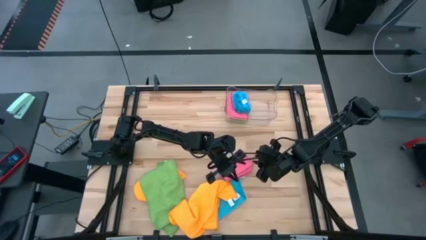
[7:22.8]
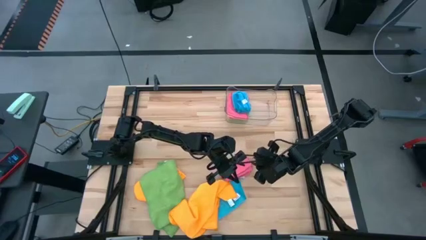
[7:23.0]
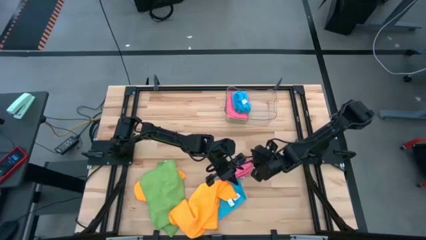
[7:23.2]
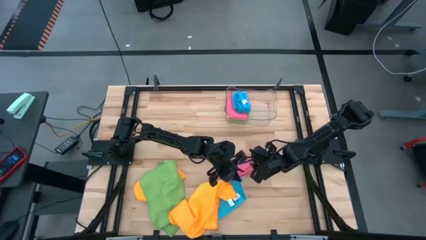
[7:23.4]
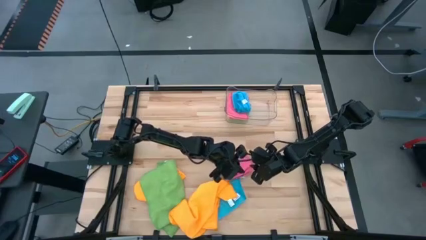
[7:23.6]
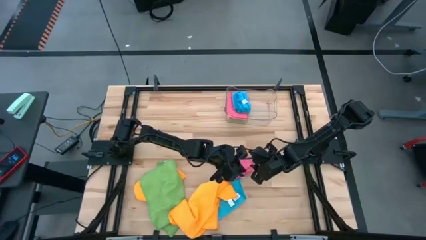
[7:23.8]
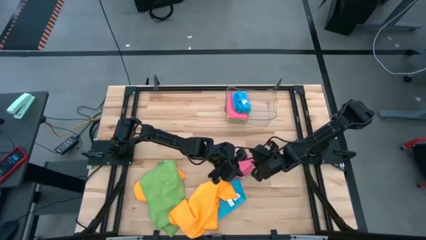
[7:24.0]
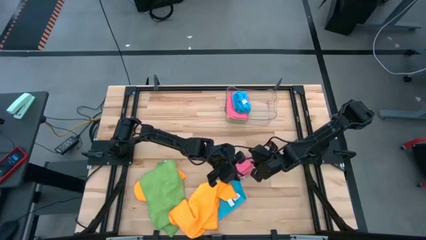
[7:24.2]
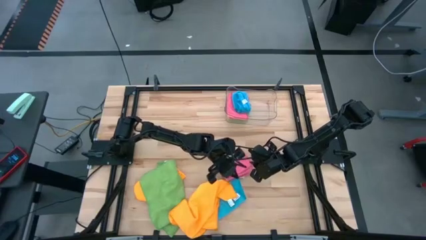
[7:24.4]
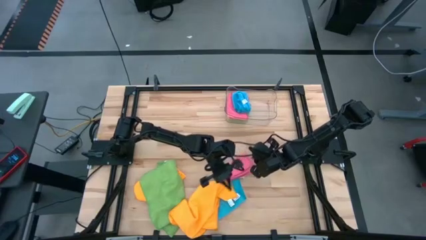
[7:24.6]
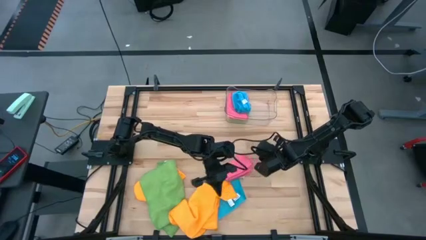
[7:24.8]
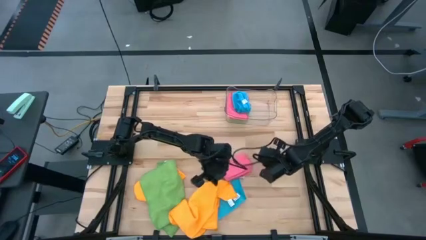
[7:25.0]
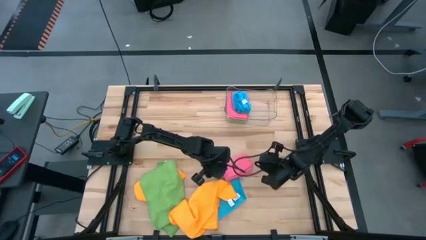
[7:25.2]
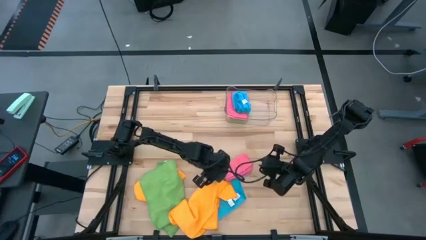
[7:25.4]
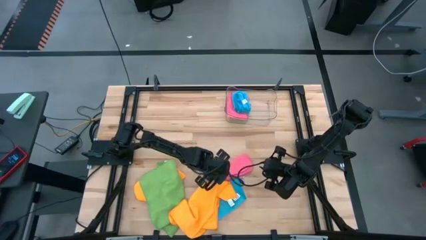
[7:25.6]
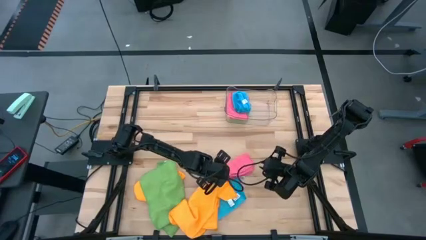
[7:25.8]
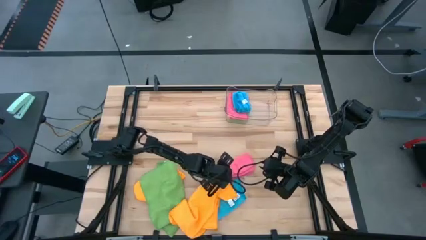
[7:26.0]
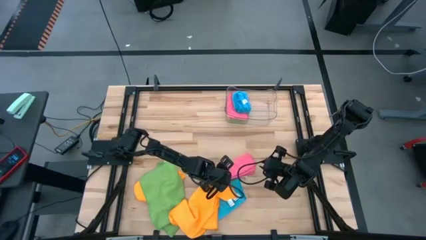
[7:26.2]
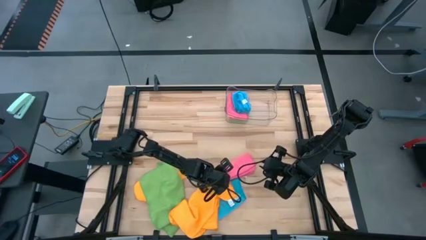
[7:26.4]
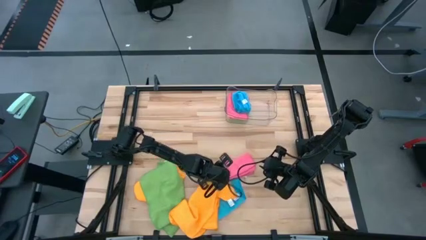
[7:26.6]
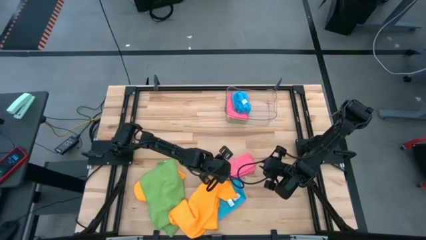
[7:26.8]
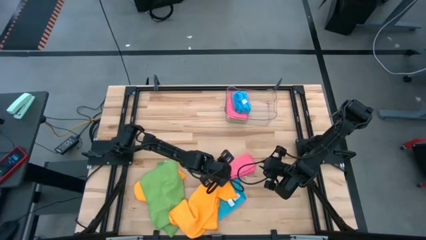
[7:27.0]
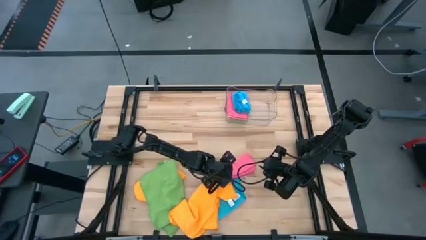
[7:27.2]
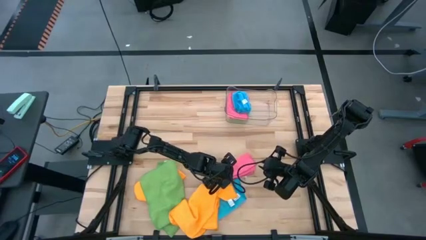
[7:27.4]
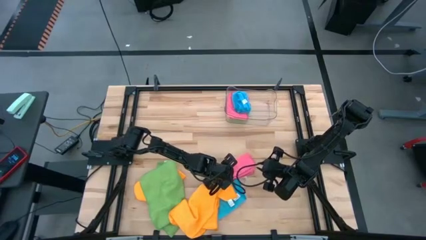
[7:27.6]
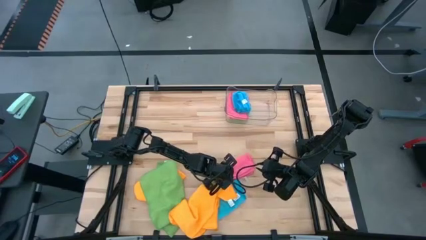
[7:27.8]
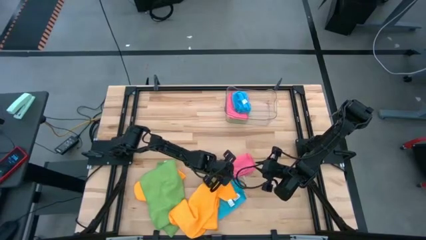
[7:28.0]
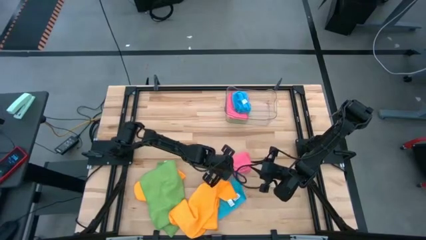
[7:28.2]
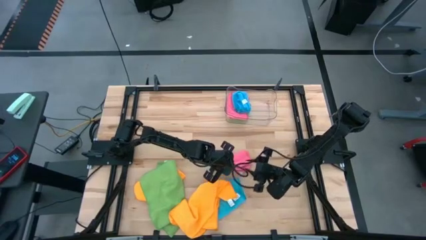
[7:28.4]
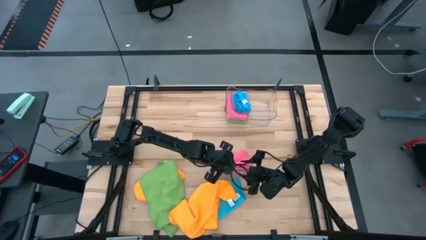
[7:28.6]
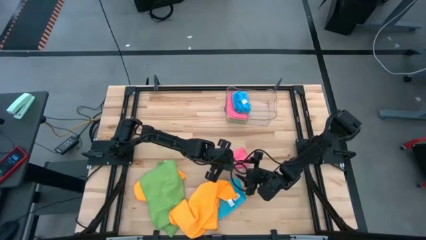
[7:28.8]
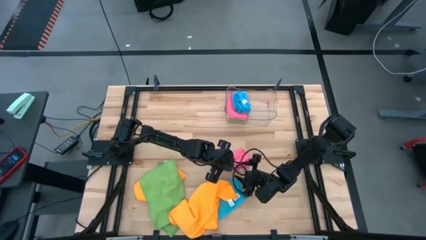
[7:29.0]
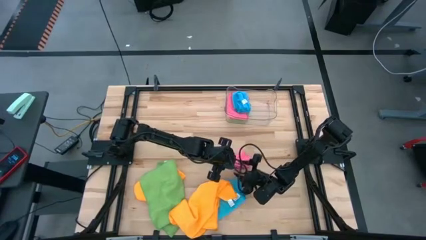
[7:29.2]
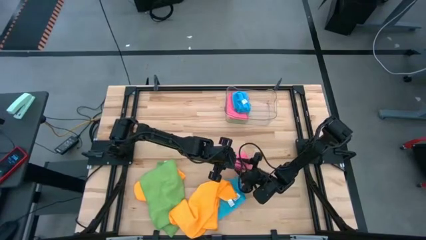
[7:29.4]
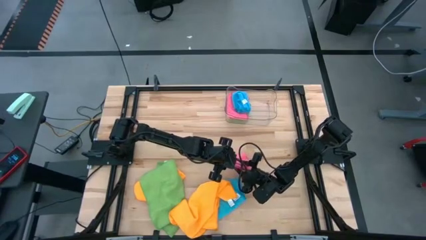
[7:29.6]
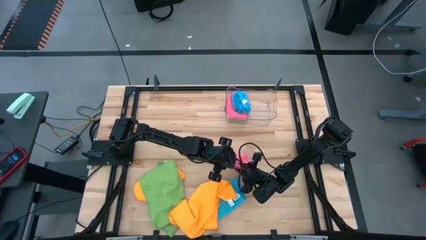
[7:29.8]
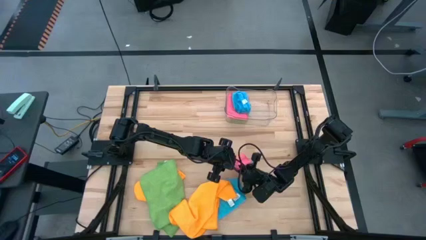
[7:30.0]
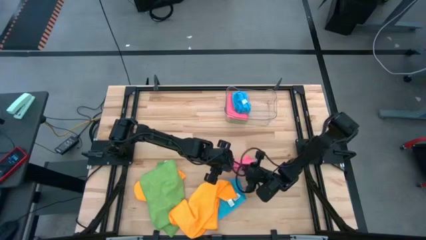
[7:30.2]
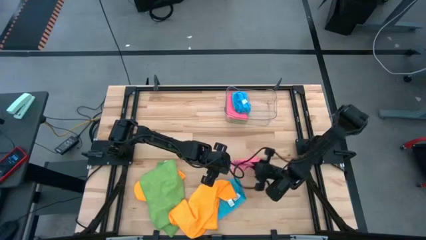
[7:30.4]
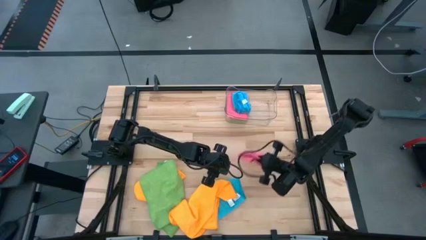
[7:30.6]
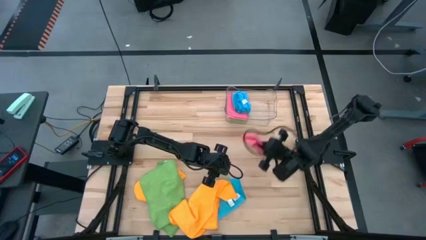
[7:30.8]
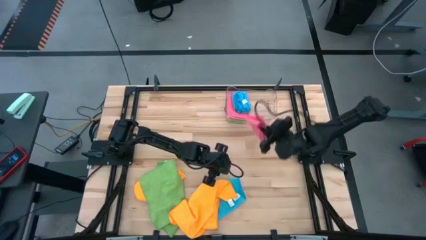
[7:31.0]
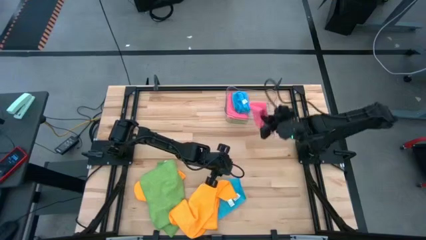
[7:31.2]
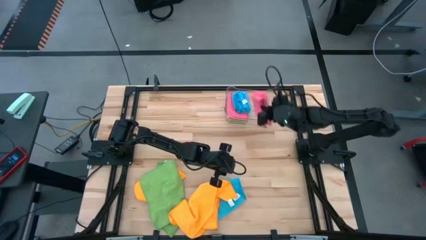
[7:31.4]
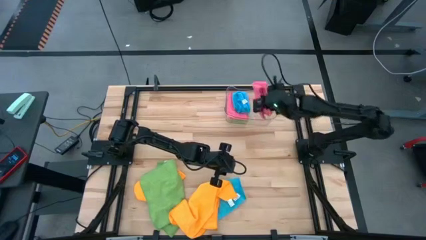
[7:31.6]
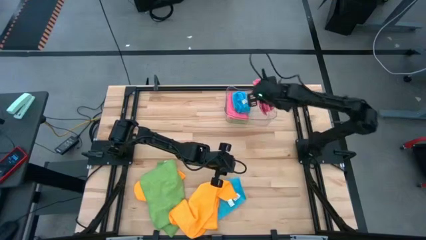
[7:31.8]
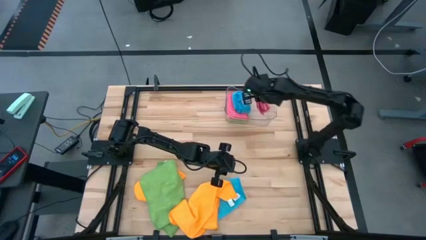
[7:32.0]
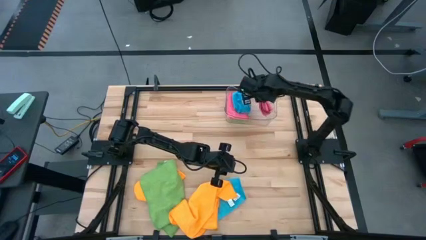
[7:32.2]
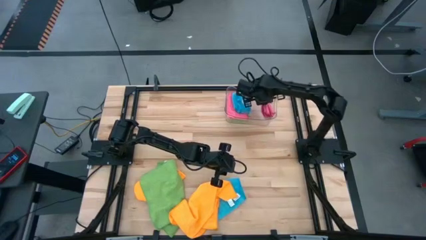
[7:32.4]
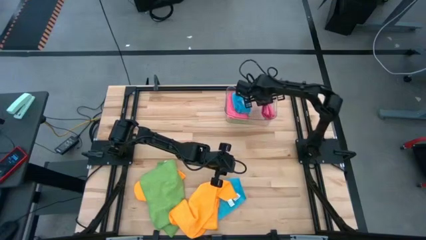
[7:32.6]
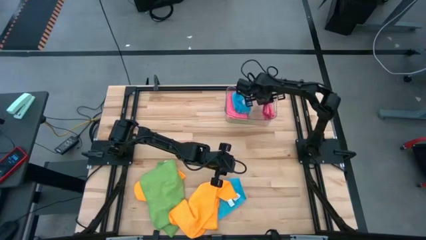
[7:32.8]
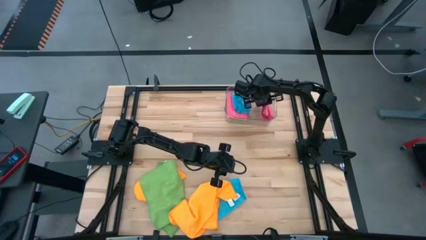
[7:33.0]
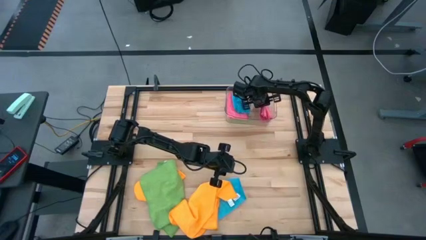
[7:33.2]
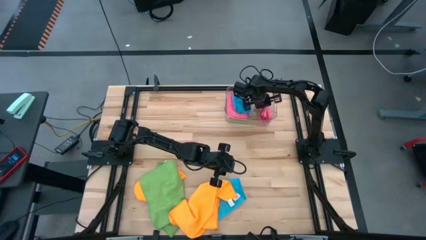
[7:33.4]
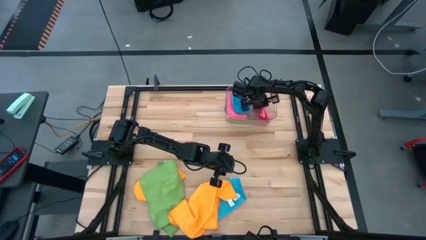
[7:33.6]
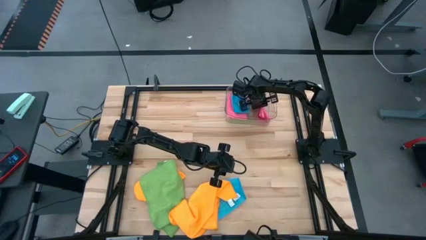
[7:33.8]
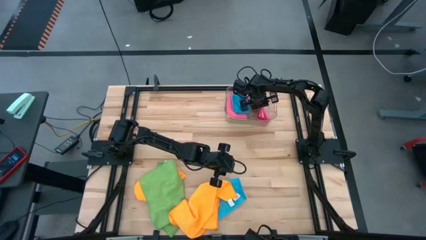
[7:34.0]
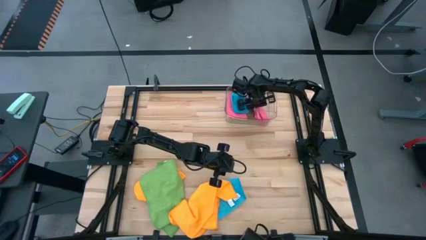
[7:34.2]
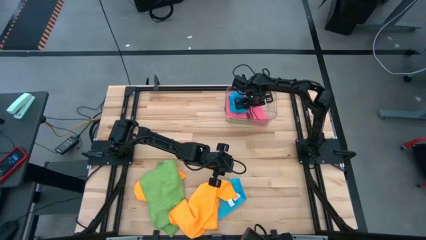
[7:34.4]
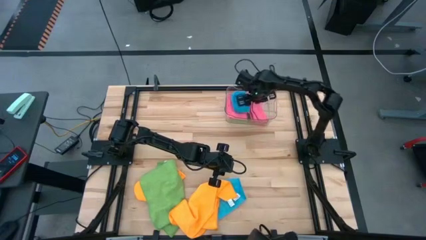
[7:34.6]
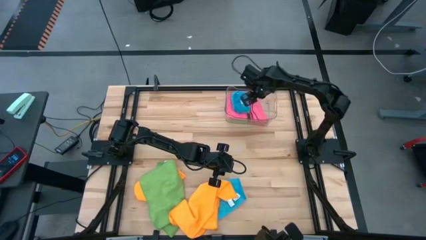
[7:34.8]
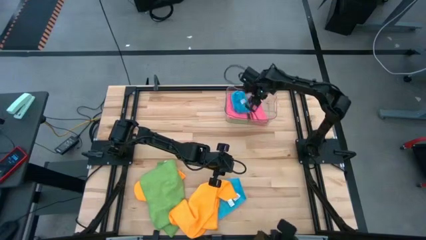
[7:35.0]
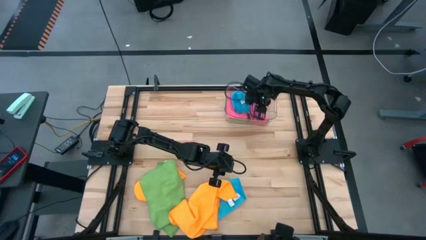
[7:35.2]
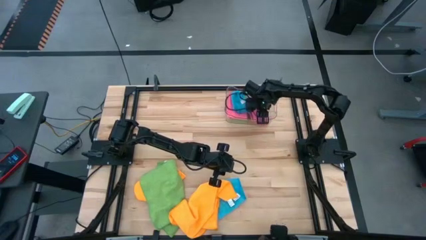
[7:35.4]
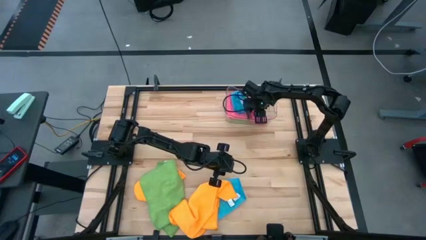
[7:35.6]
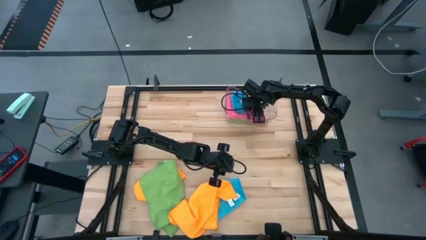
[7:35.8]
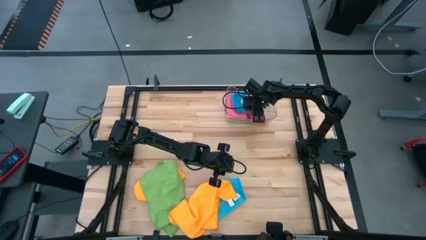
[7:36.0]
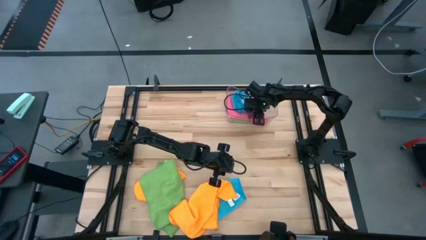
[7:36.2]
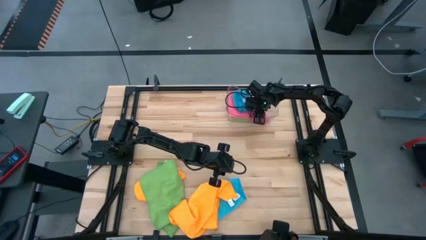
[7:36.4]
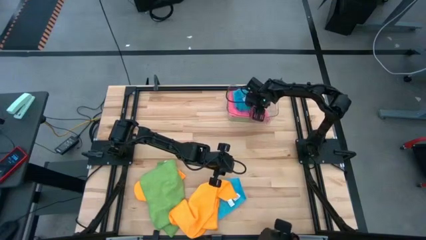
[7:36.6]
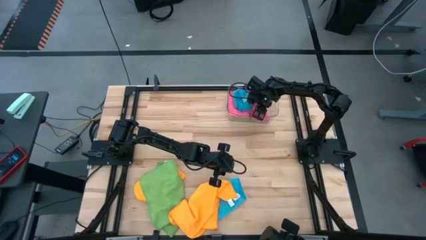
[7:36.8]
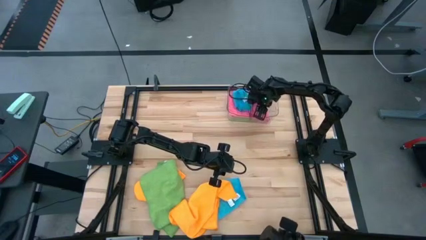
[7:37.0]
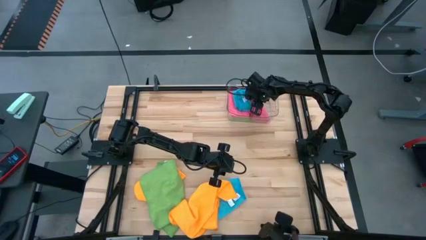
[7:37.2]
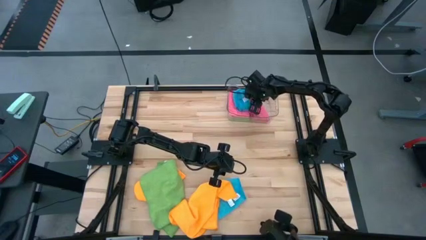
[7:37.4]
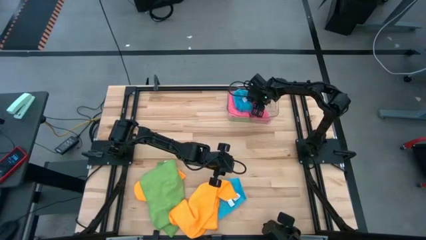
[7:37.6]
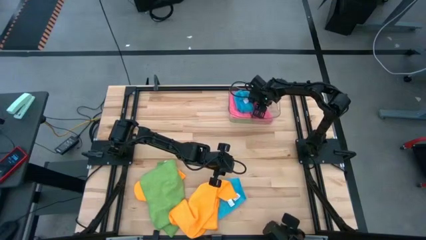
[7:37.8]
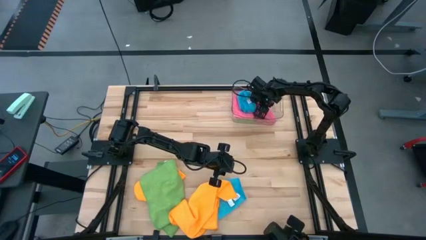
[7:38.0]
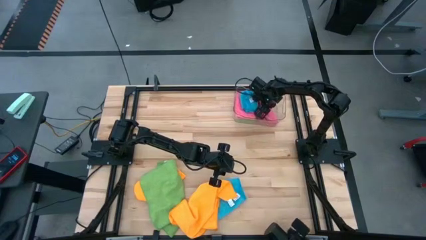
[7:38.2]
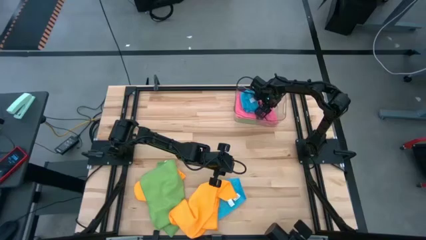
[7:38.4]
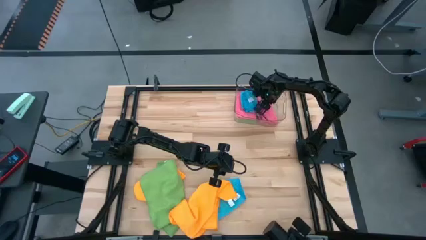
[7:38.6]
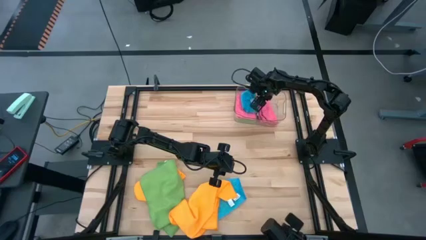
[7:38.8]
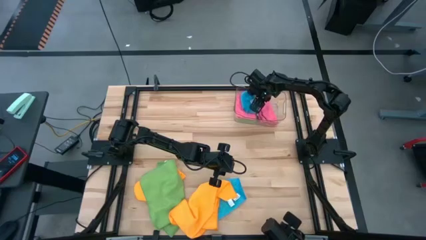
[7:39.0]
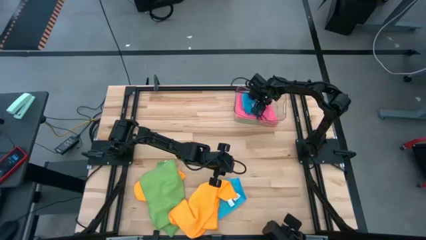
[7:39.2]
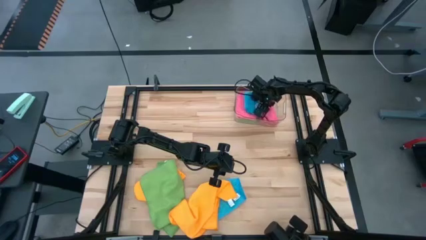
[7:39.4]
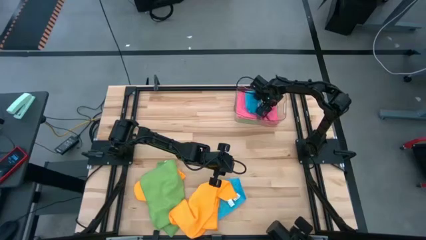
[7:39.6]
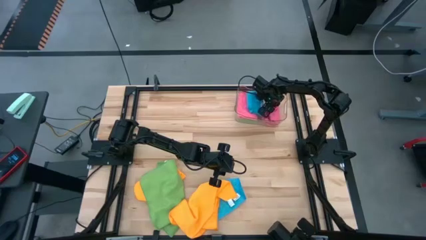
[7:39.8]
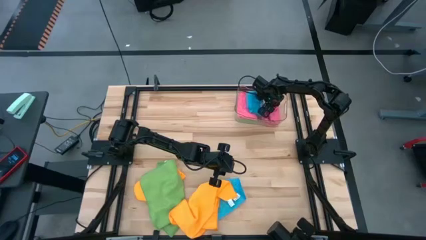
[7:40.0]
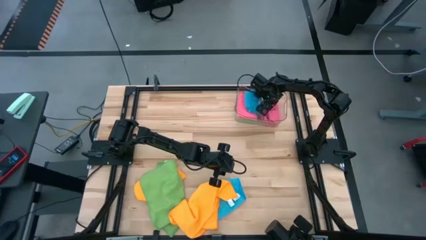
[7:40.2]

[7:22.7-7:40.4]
Task: Fold microfiber towels
Put the pink towel into the transparent bin
